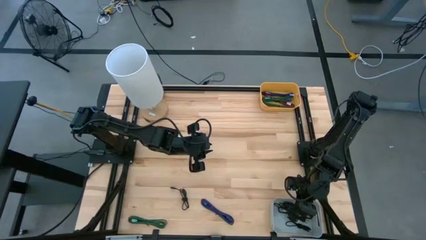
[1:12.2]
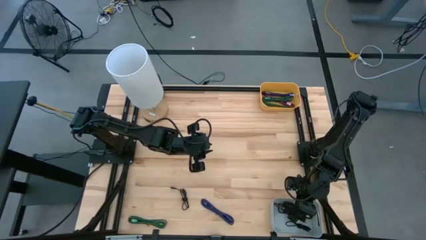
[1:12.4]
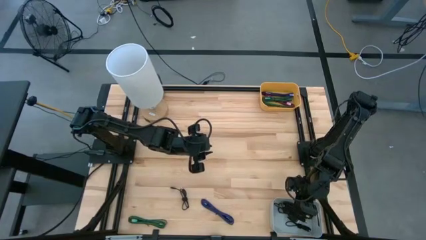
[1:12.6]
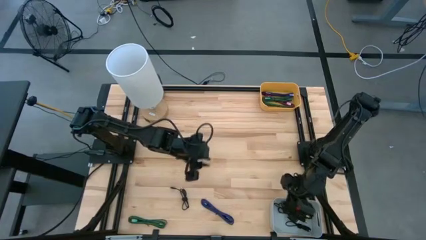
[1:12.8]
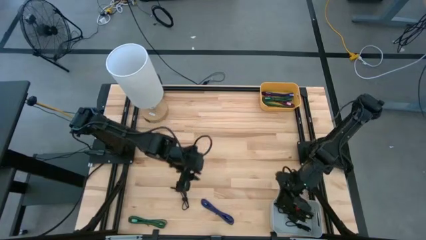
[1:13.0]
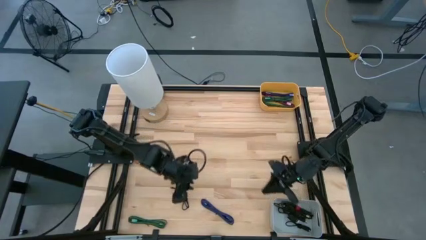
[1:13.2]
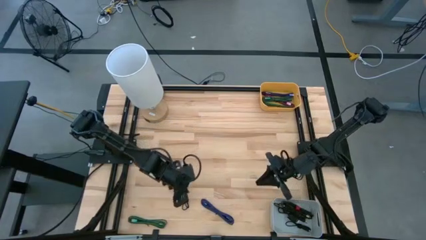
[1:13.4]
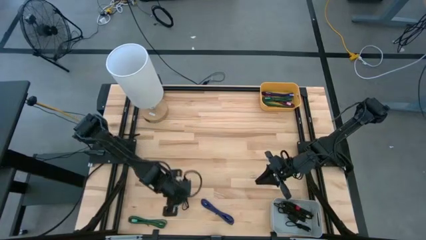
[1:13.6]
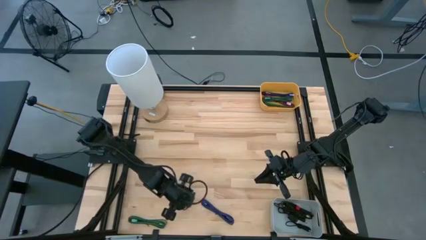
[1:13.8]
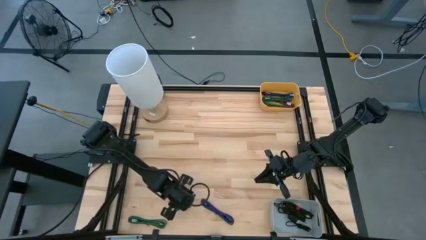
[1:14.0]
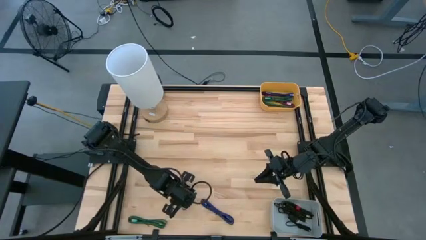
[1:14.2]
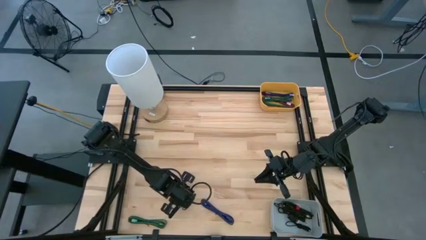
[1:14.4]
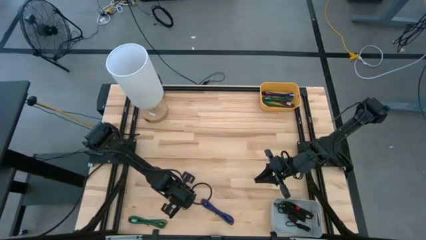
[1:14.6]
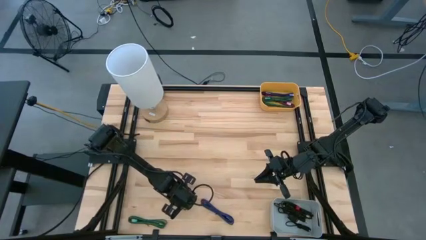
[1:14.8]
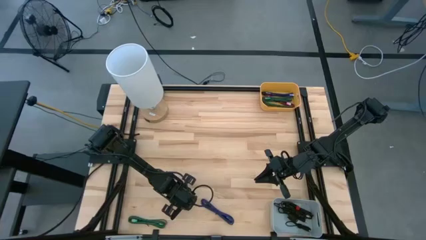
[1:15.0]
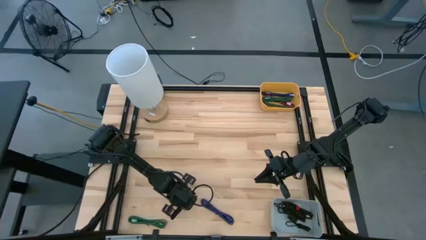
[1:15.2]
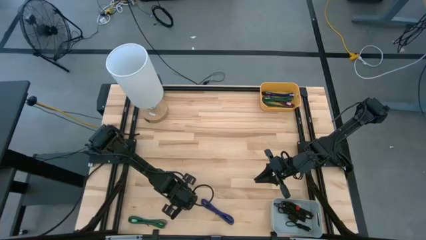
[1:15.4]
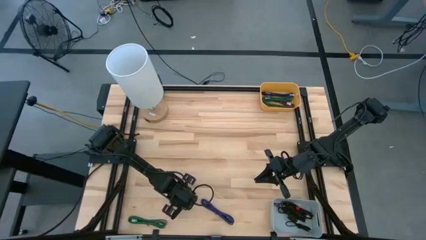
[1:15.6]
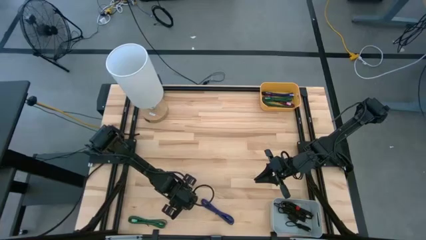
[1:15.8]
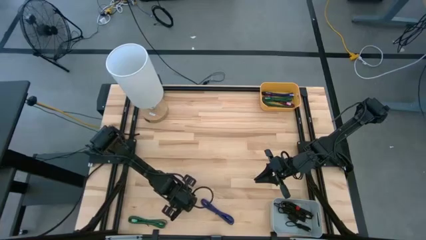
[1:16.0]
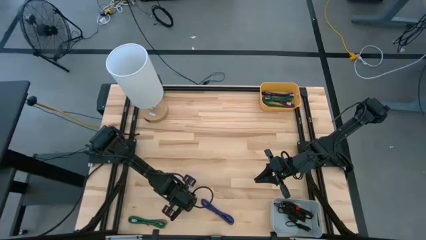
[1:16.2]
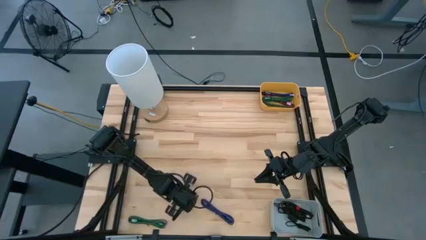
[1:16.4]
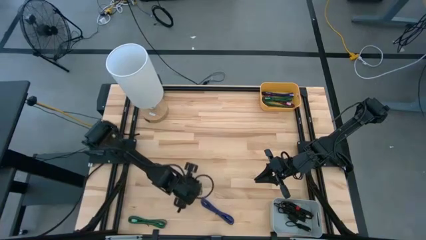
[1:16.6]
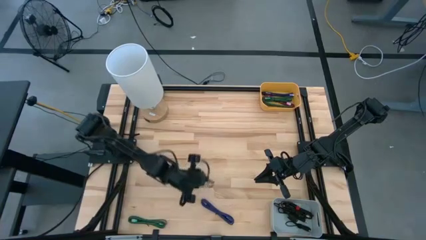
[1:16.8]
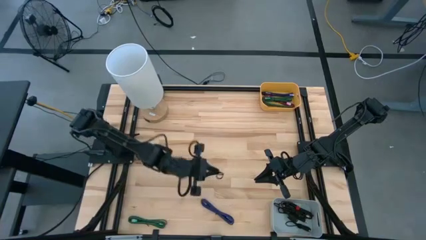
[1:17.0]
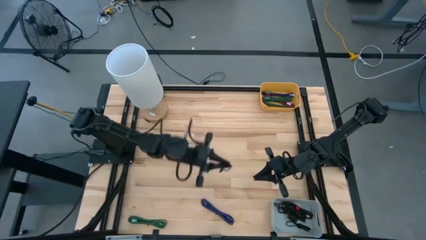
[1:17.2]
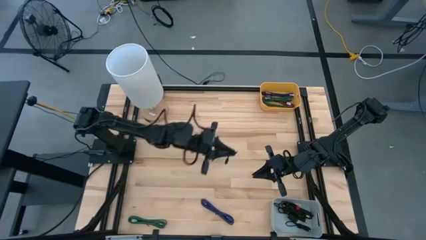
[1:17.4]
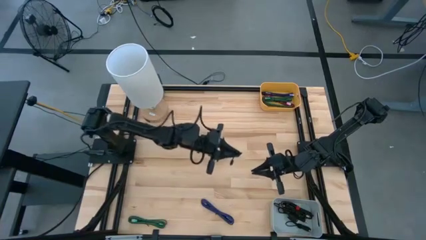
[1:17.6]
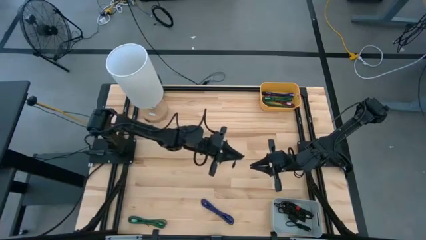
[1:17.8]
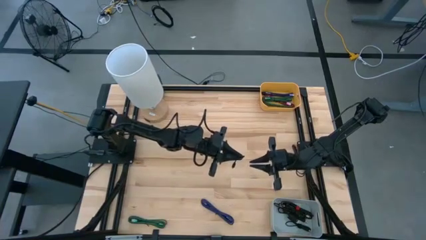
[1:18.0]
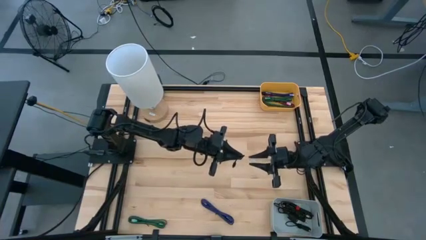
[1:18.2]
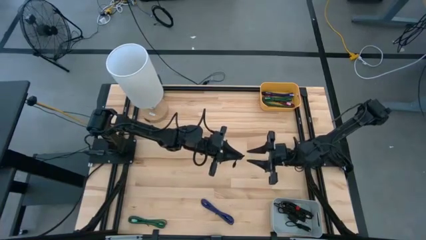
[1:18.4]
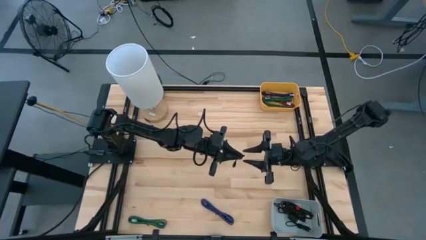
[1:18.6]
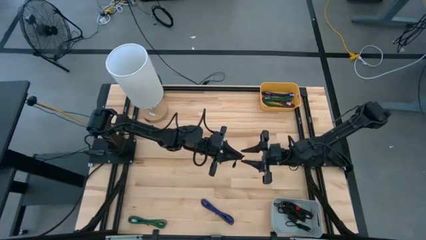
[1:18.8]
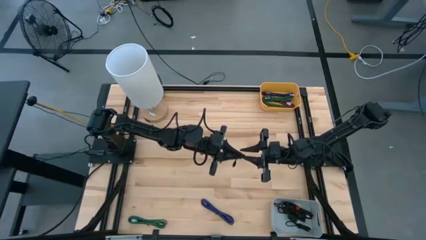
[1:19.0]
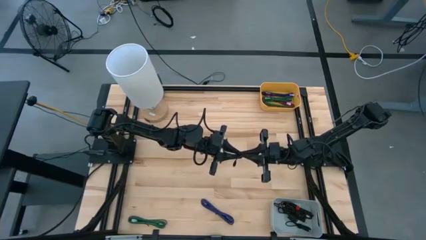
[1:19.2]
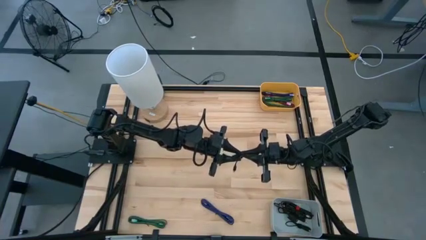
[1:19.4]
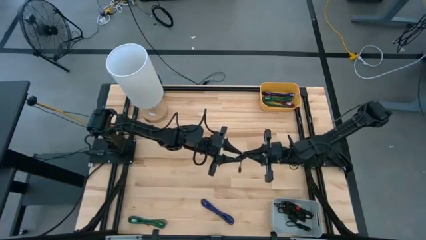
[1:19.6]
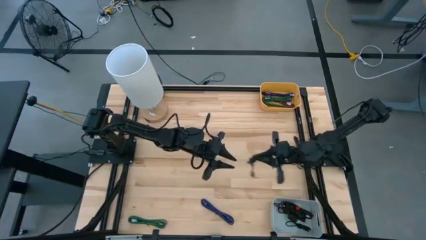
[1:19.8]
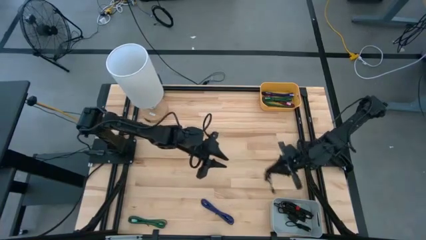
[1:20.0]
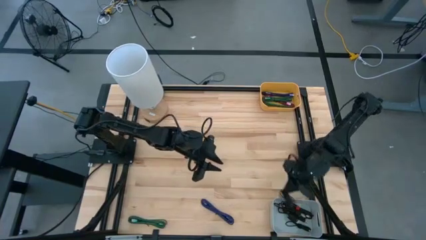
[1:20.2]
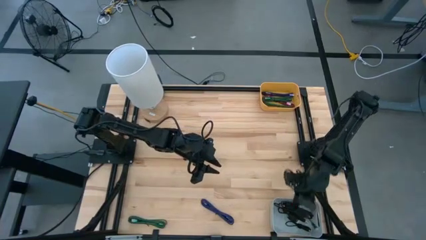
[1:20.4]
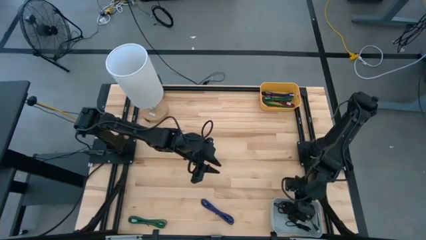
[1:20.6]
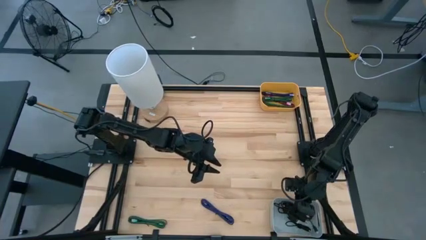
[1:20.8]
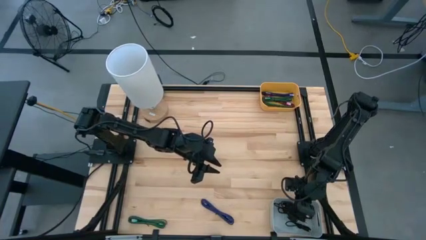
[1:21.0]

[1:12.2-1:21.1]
Task: Pick & Place USB Port
Put the black USB cable into the gray bin

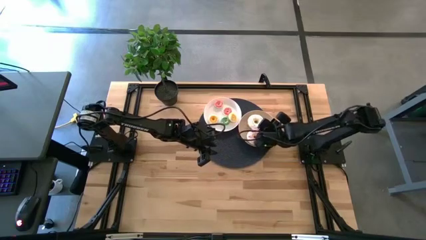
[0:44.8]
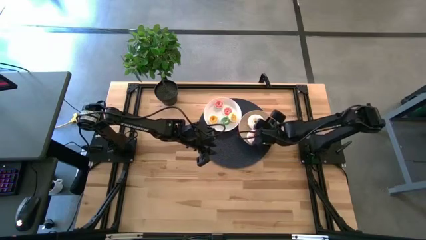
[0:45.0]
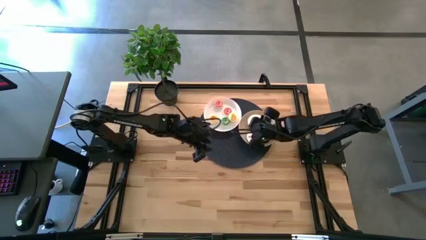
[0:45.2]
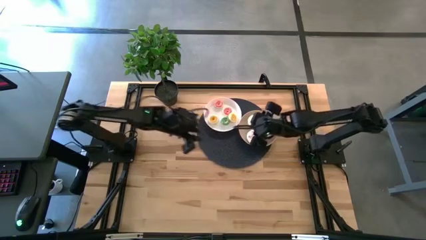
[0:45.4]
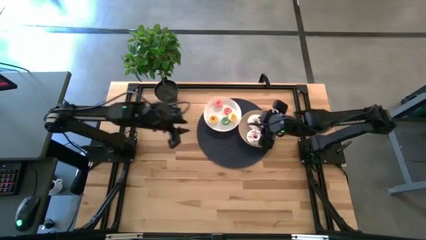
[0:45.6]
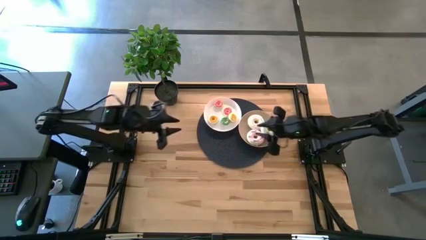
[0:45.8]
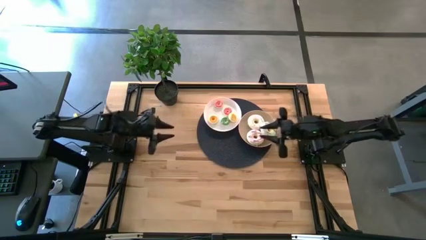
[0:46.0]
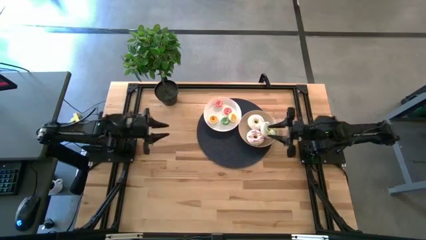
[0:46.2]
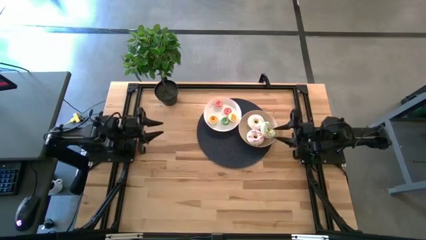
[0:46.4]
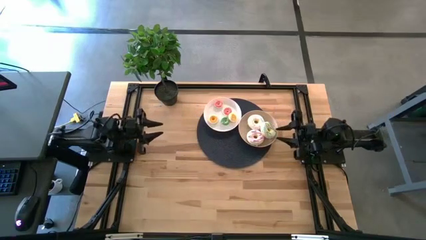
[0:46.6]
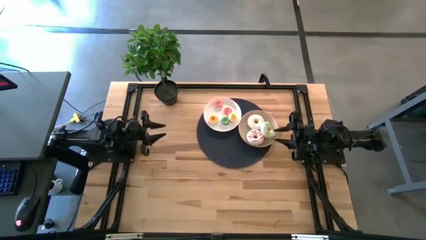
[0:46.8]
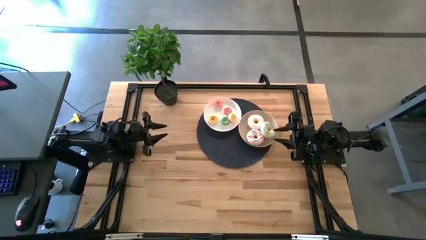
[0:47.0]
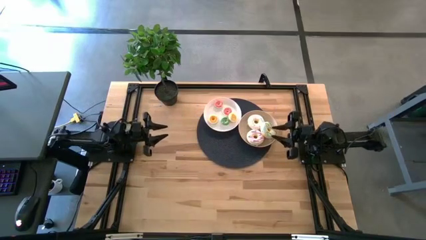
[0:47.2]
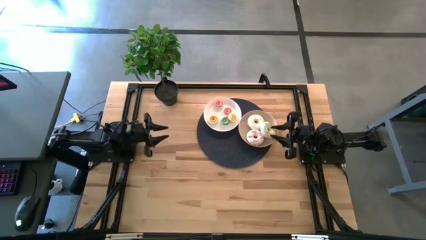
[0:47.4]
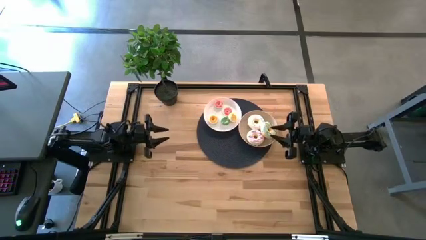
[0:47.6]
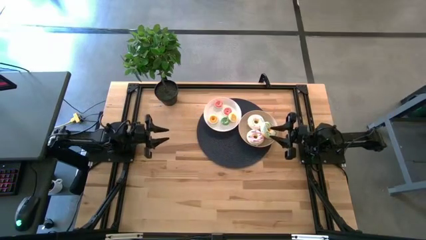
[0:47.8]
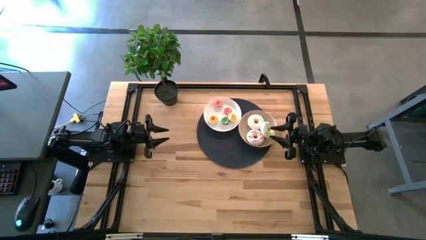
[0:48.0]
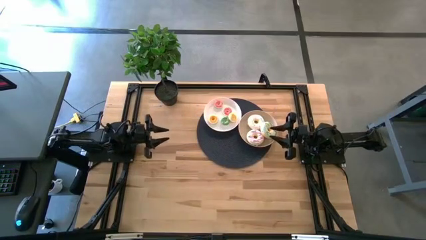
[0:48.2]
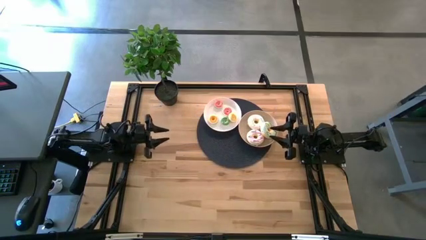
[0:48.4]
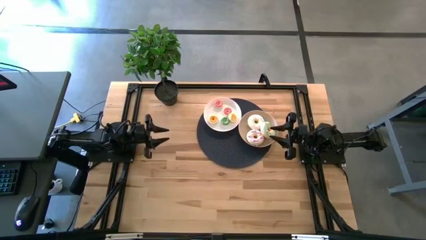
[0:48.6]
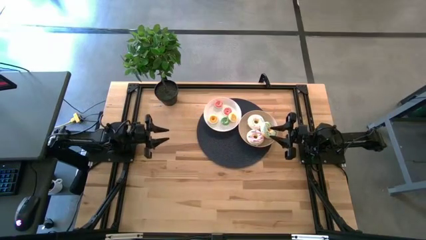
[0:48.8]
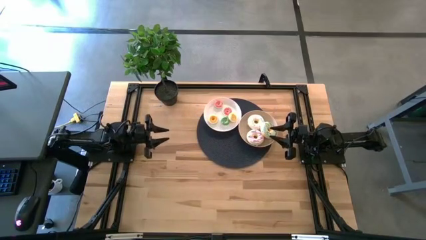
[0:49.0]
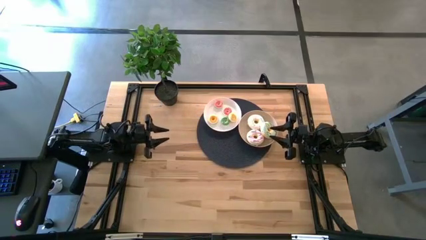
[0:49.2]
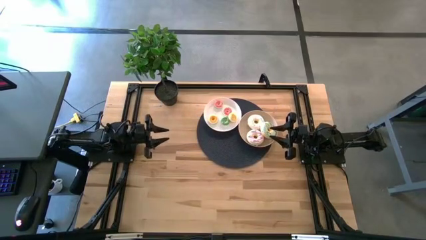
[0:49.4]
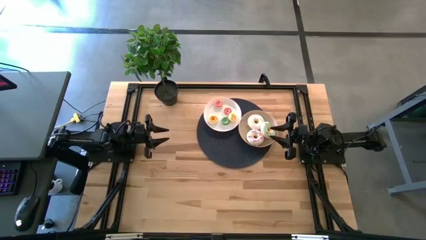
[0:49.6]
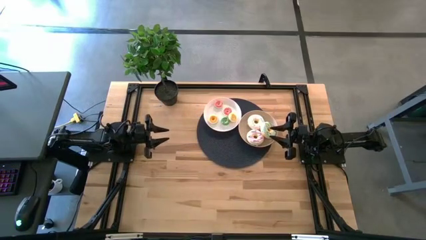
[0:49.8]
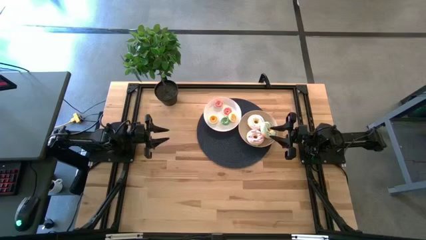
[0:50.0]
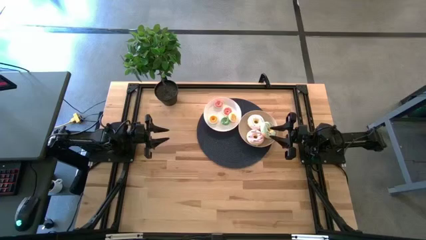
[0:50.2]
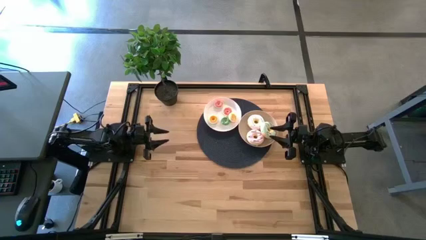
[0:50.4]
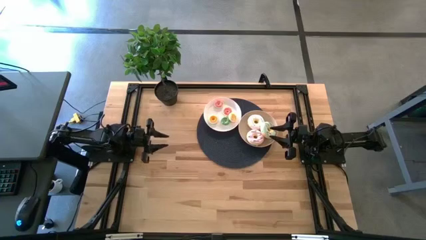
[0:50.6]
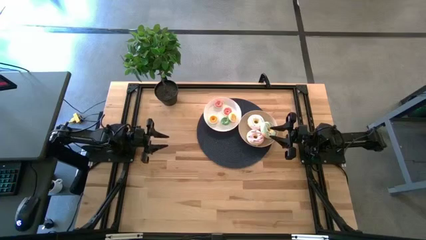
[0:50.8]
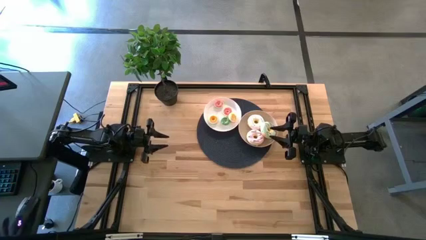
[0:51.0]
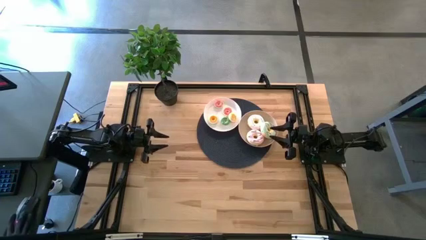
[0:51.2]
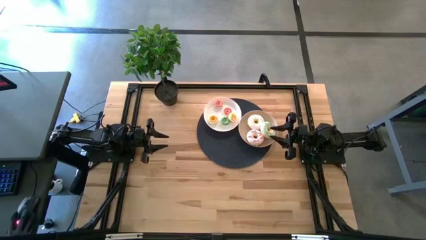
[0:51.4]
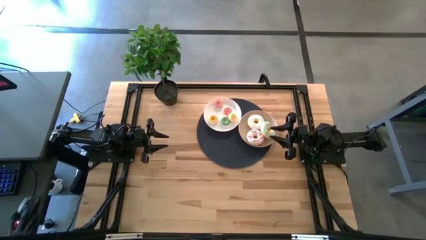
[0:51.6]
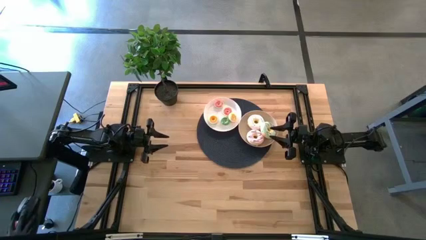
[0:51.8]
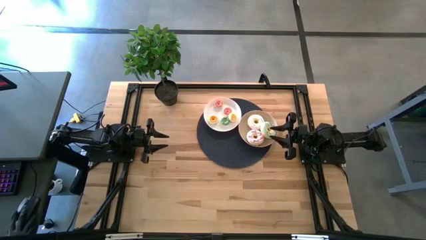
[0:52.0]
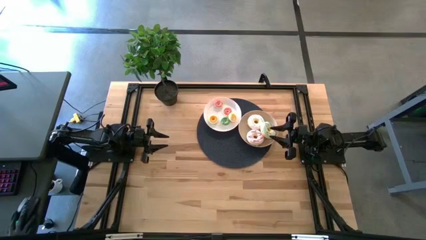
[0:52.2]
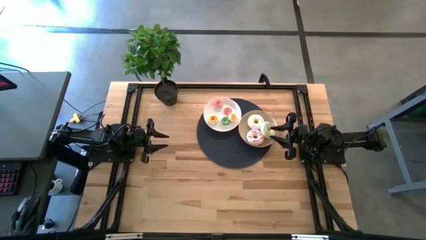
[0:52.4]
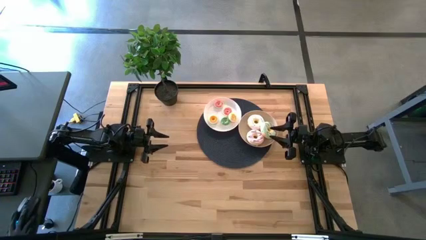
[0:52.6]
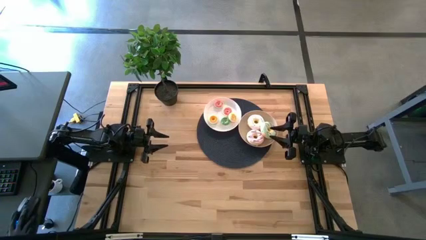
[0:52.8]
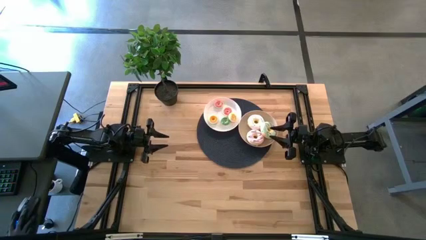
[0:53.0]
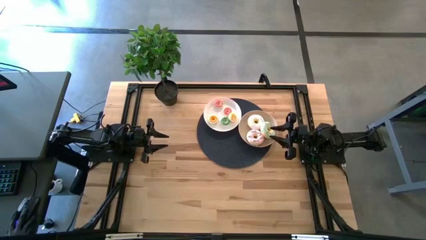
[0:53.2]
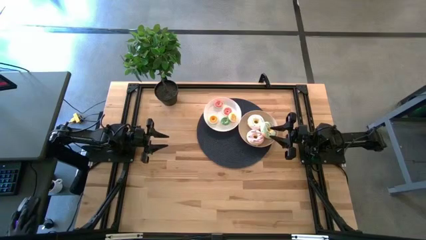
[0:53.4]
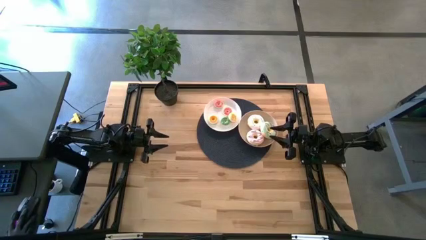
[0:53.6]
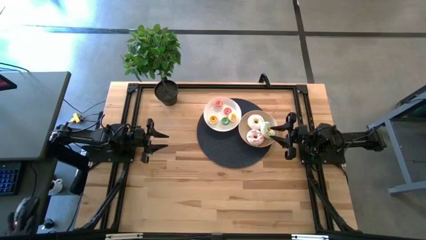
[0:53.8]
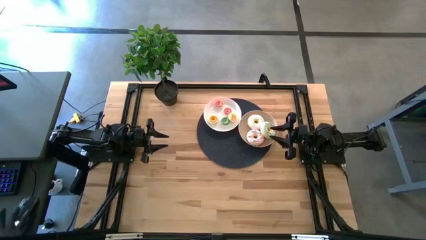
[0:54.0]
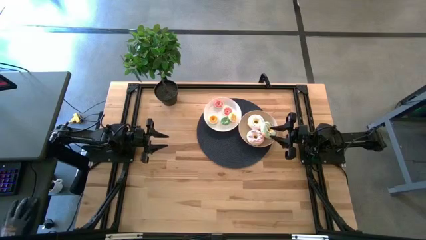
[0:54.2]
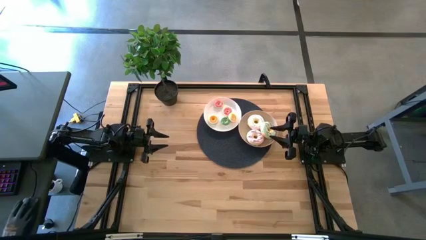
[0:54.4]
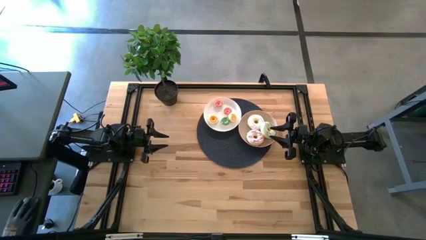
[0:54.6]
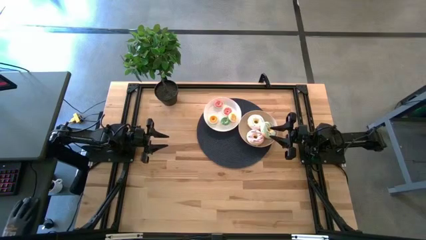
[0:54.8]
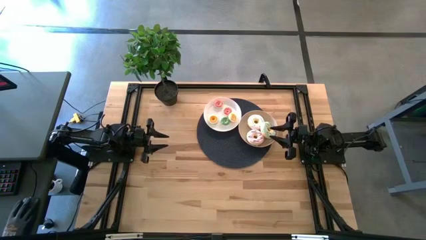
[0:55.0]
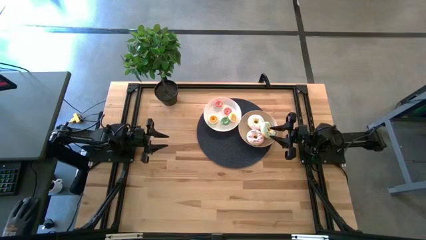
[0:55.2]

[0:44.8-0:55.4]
Task: Pick & Place donuts
Return to Home Position
